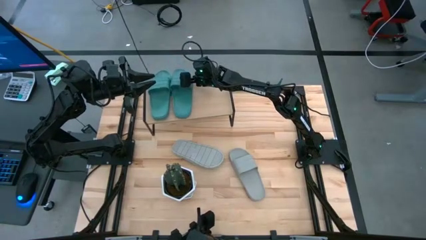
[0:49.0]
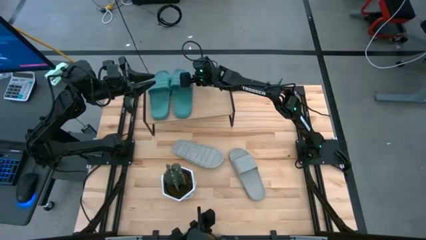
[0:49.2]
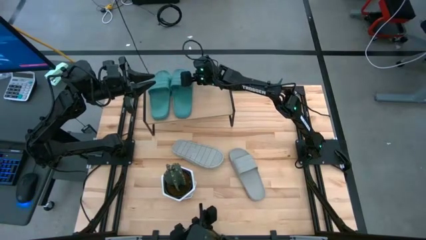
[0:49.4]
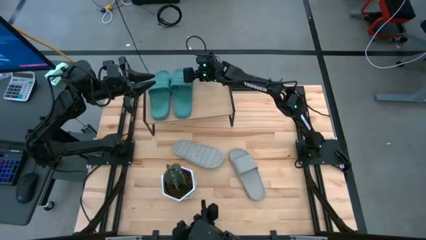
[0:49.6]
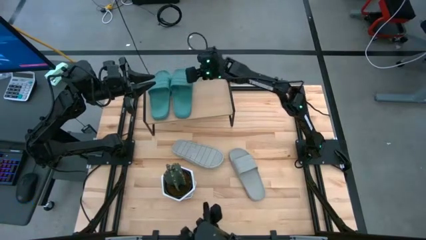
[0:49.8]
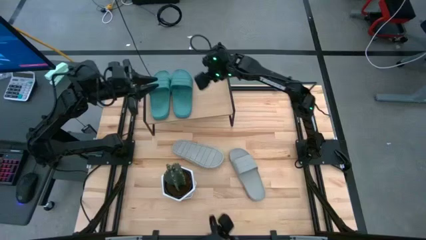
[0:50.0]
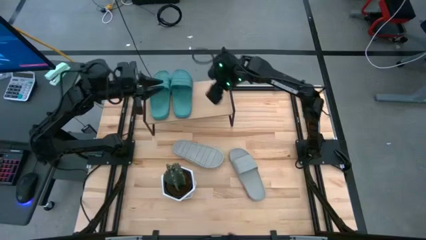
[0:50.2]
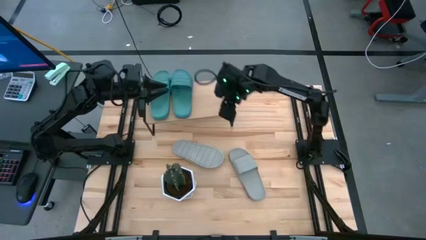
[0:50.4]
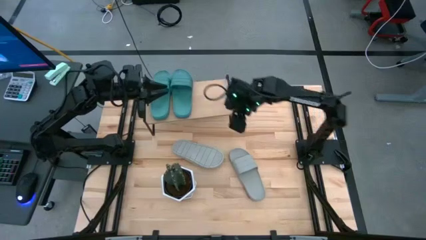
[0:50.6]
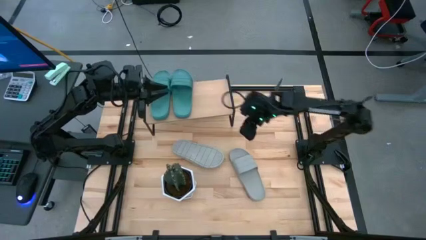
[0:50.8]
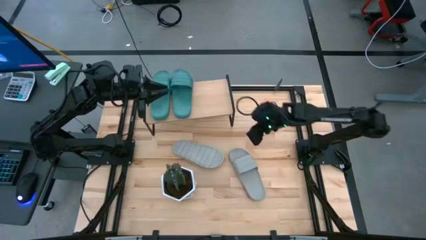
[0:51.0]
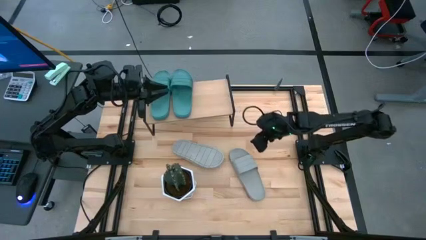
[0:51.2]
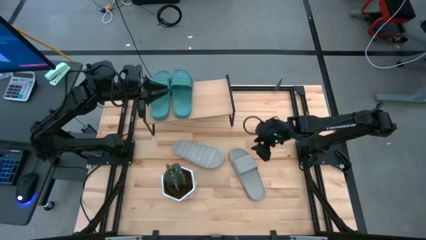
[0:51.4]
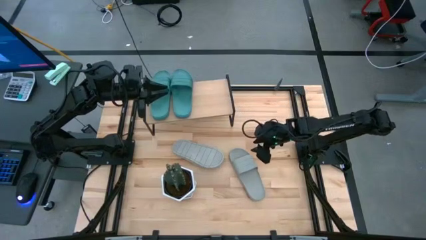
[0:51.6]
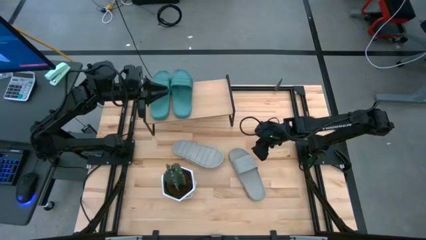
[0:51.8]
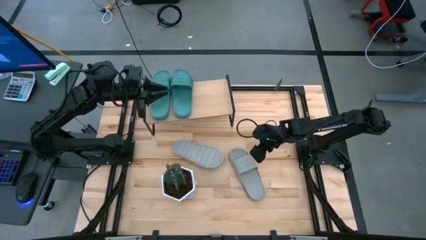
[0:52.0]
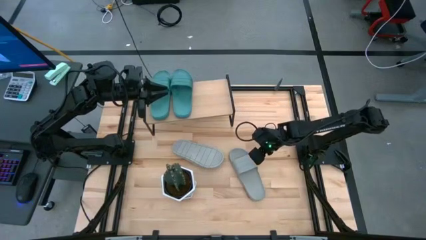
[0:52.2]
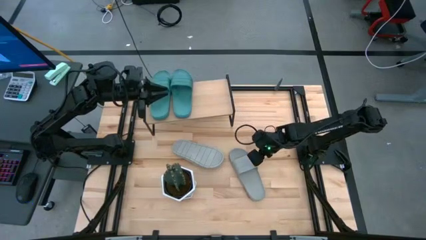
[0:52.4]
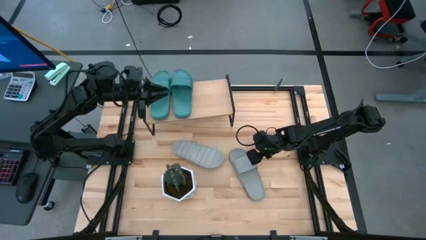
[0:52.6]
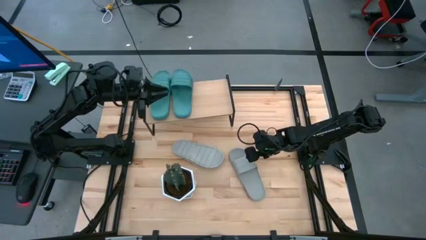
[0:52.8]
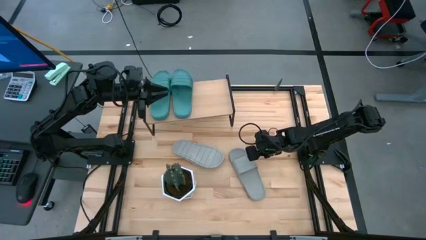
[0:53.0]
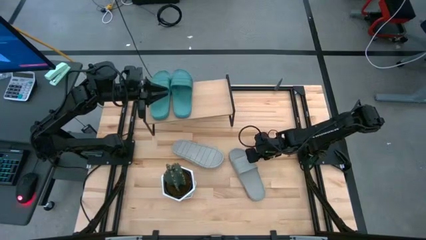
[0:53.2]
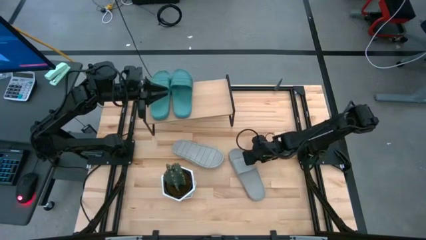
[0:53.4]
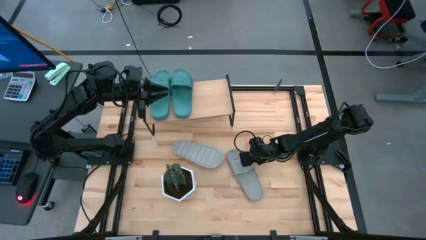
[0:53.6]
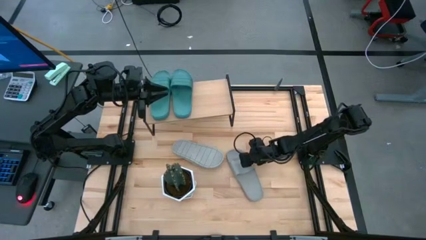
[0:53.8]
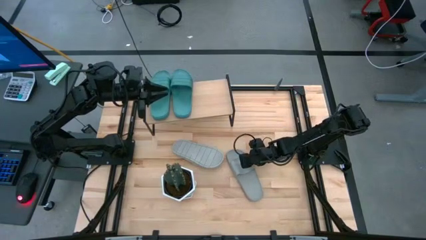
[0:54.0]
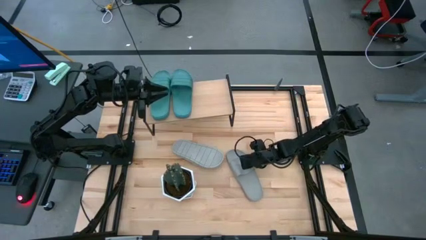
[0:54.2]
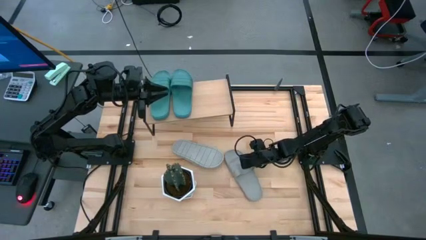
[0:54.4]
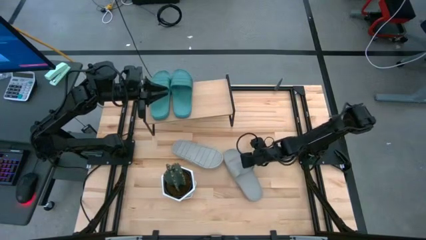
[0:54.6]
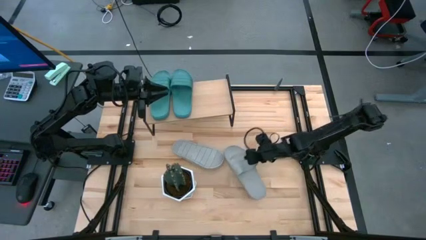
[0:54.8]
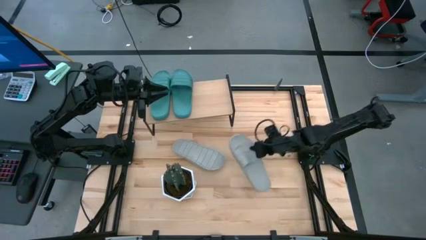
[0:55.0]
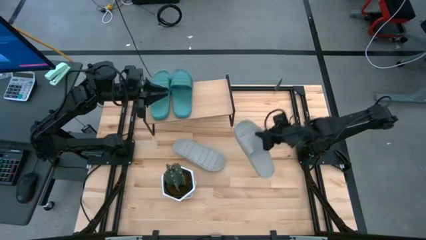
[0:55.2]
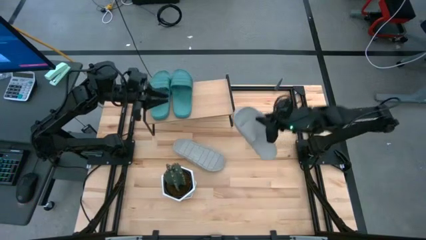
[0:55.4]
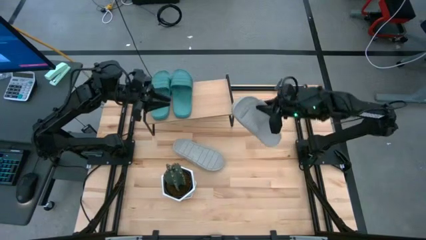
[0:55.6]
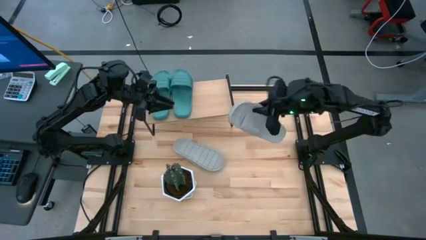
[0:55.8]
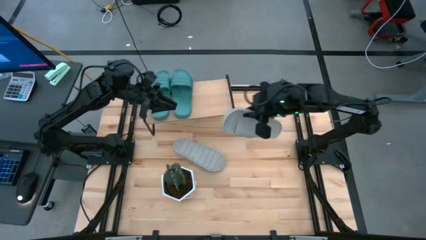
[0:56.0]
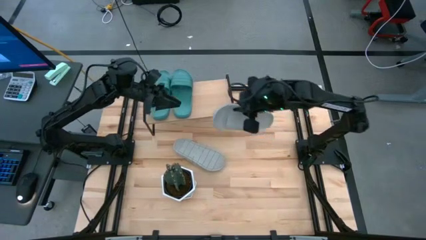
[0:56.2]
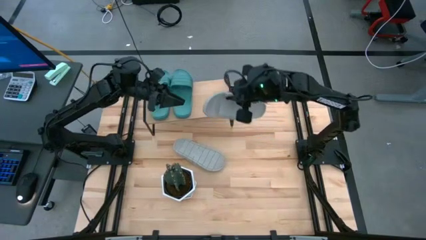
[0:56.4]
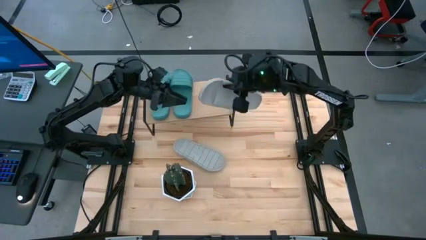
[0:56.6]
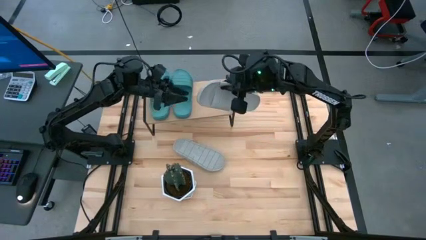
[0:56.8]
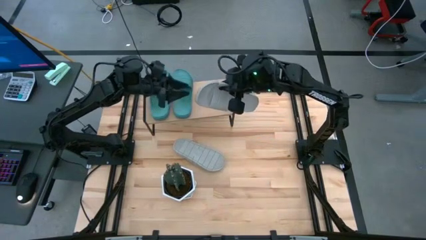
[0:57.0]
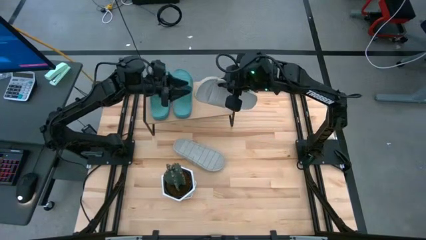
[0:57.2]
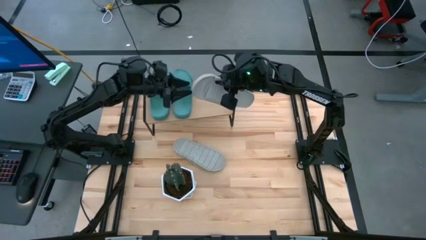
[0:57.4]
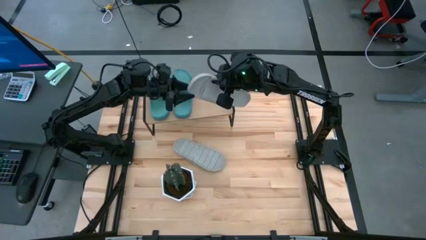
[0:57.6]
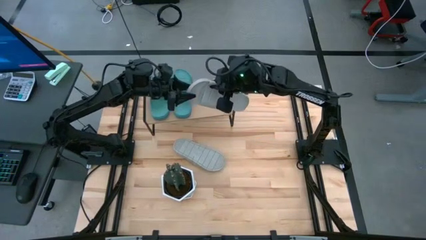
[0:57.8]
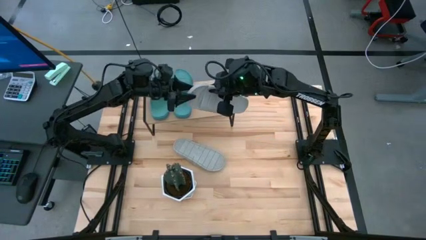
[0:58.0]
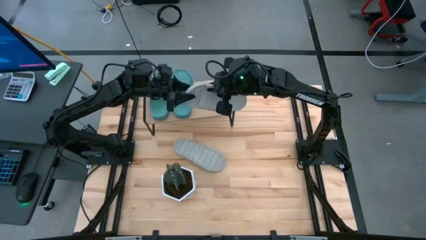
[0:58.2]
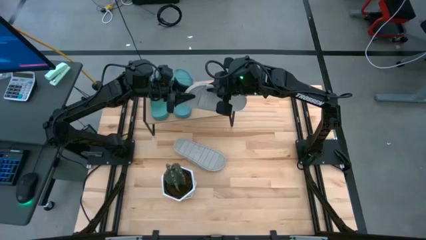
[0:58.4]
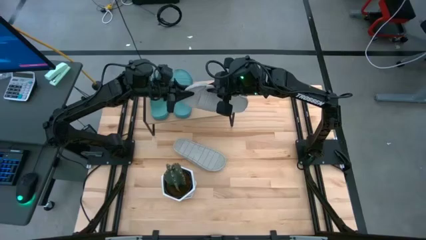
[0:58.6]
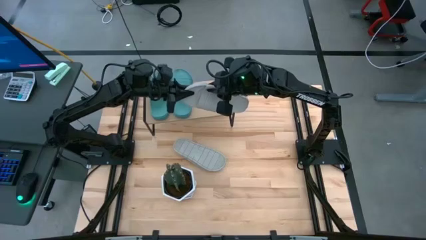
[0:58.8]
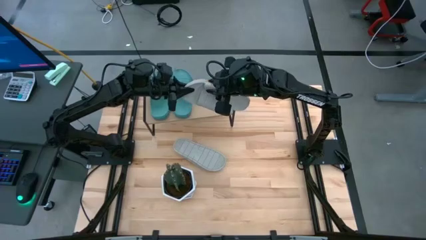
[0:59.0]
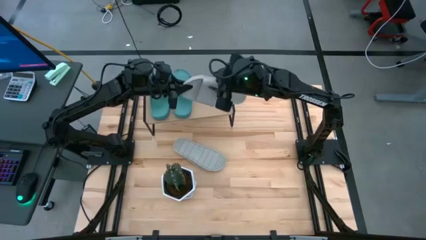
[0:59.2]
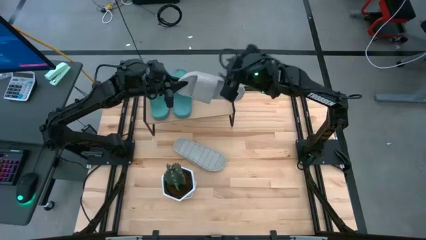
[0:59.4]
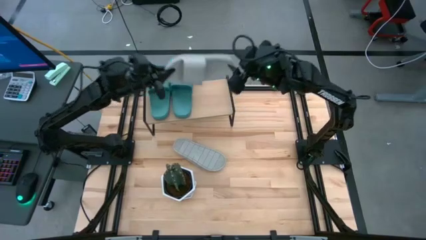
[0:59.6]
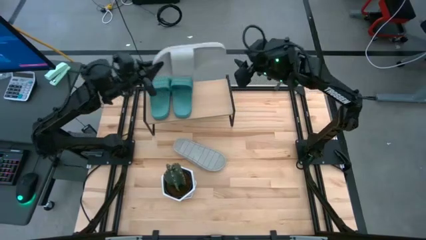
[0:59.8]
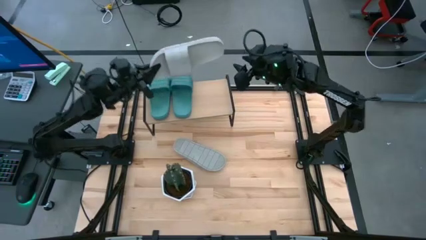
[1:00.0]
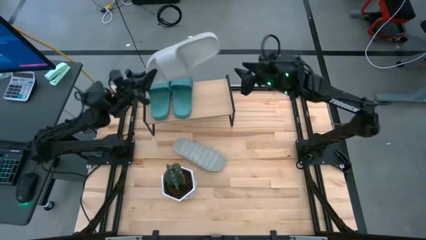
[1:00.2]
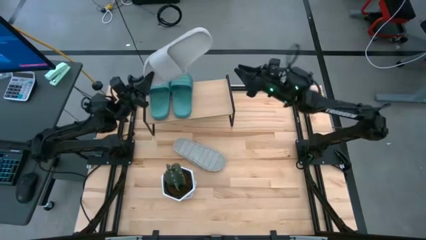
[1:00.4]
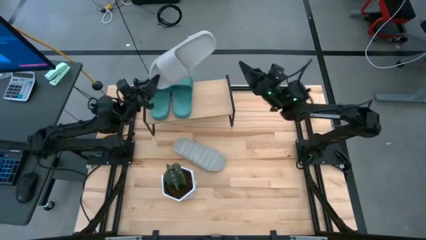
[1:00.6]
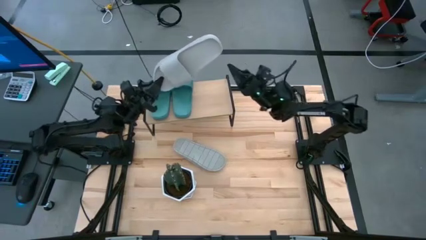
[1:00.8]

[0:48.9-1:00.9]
Task: Pick and place slides into the shelf
Put the right gray slipper on the shelf
